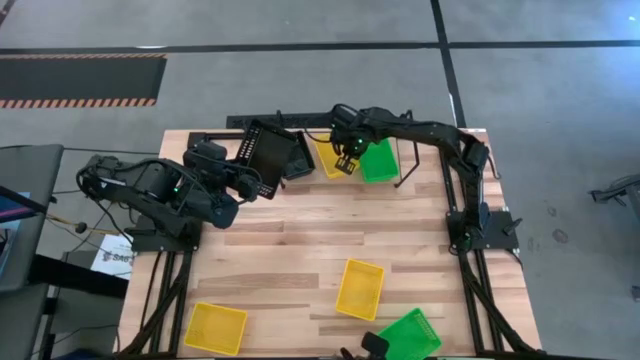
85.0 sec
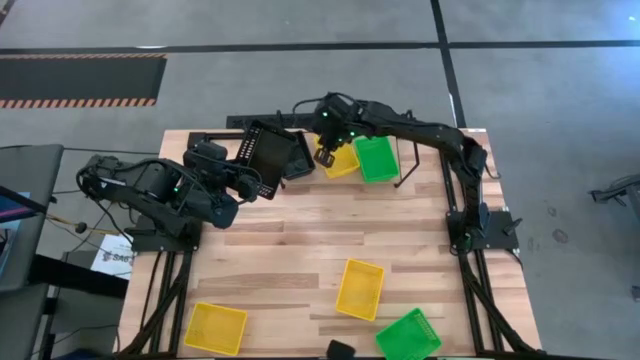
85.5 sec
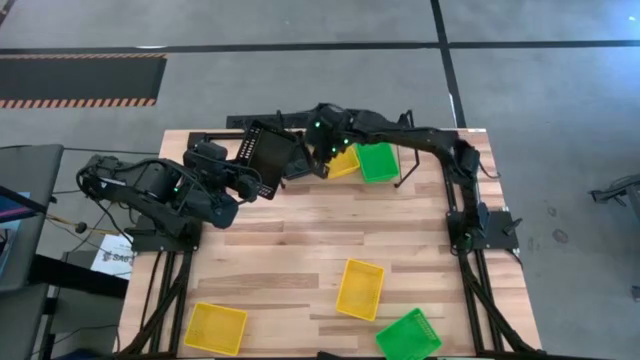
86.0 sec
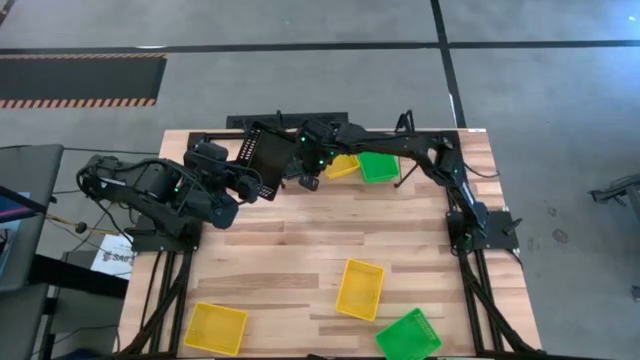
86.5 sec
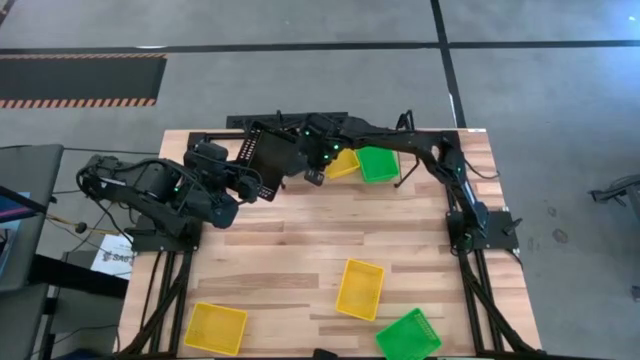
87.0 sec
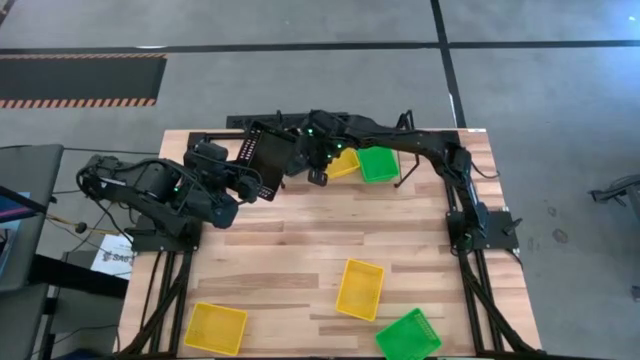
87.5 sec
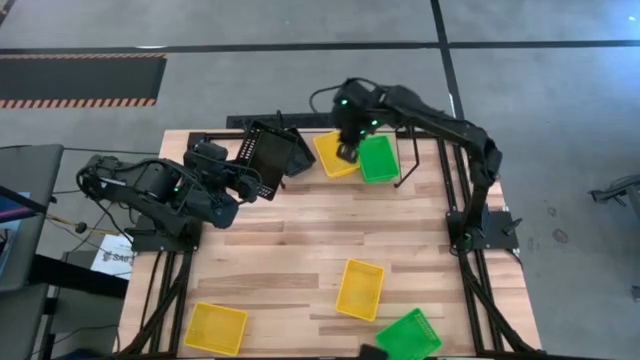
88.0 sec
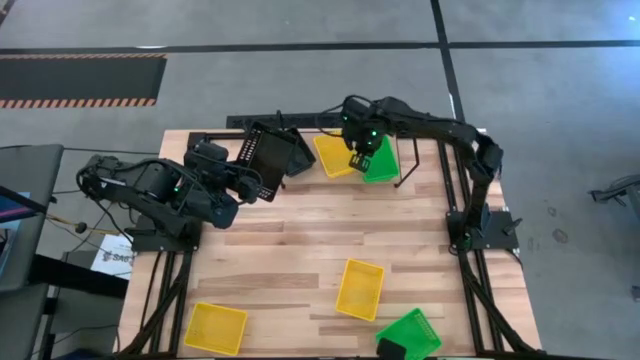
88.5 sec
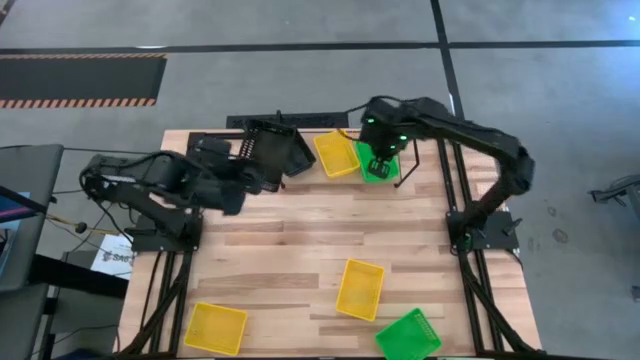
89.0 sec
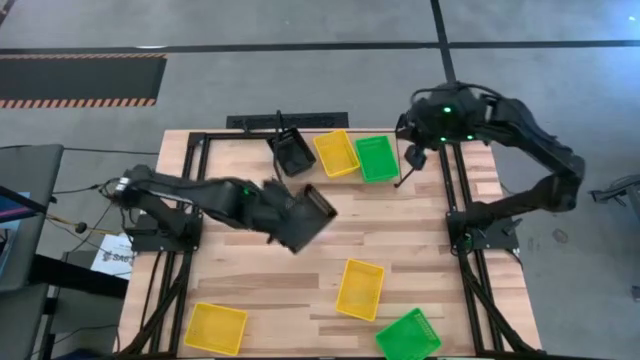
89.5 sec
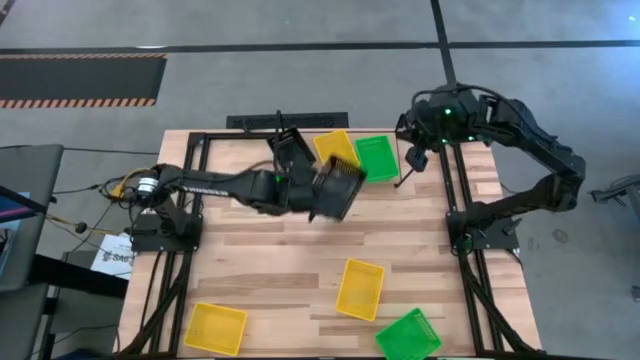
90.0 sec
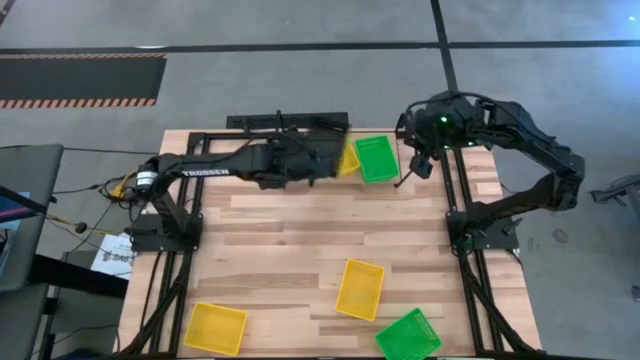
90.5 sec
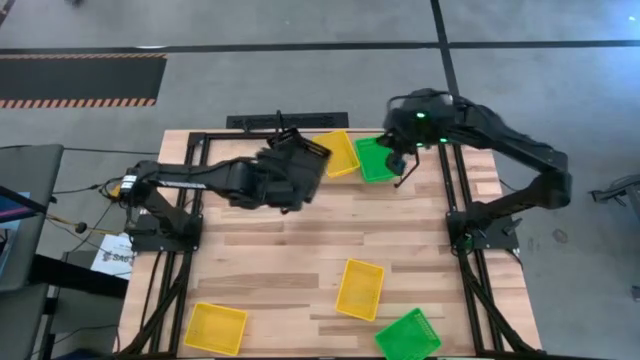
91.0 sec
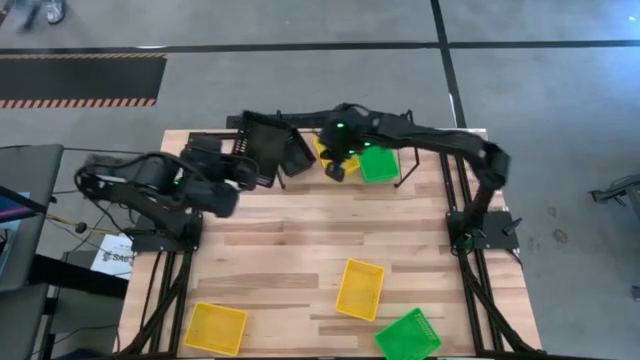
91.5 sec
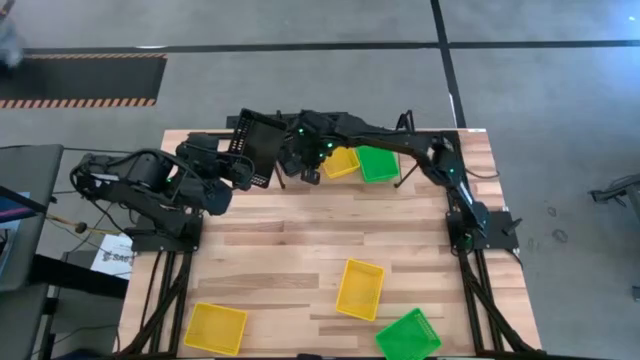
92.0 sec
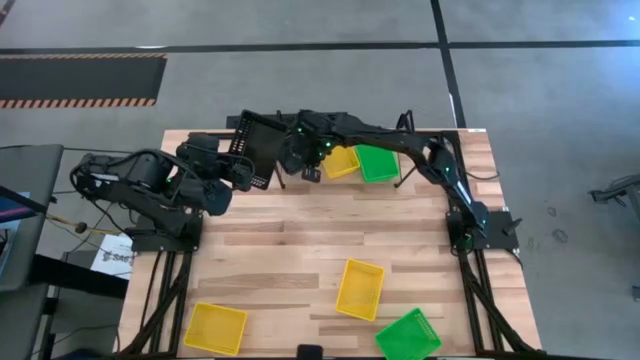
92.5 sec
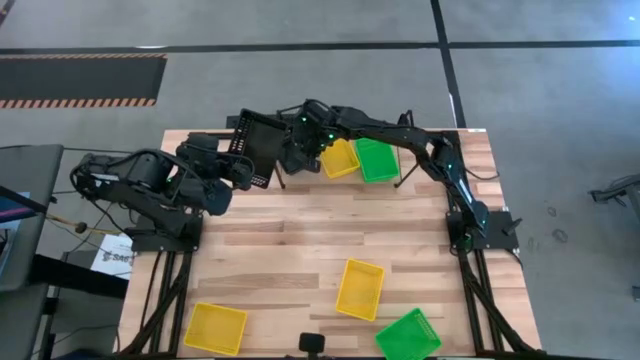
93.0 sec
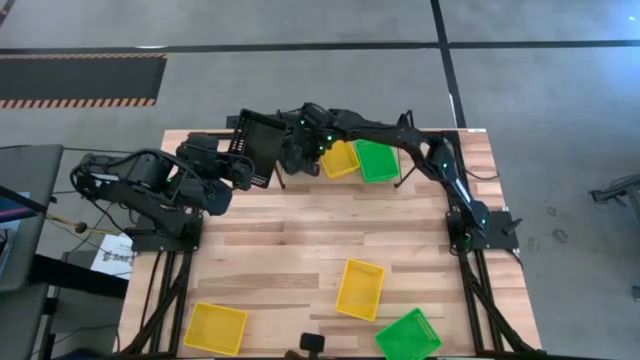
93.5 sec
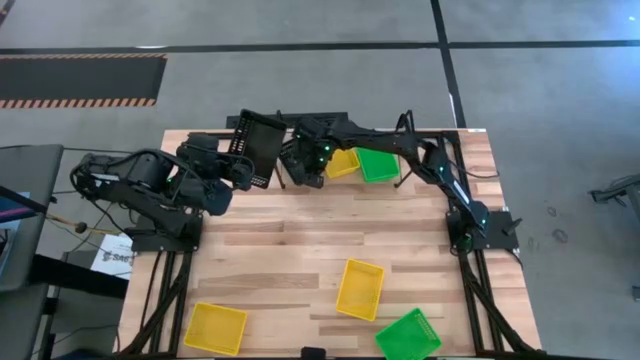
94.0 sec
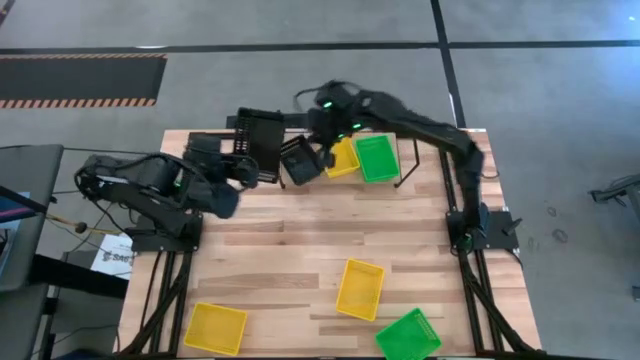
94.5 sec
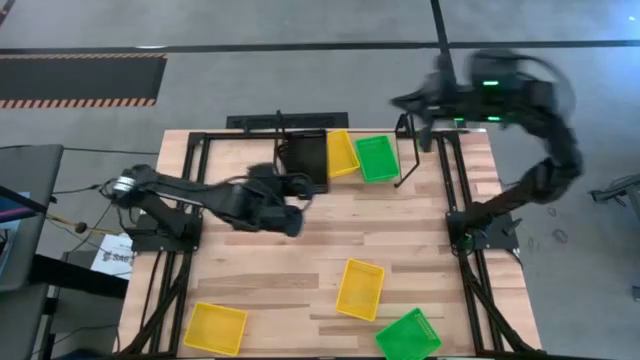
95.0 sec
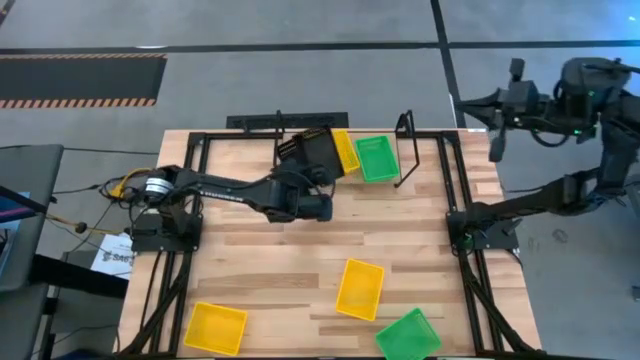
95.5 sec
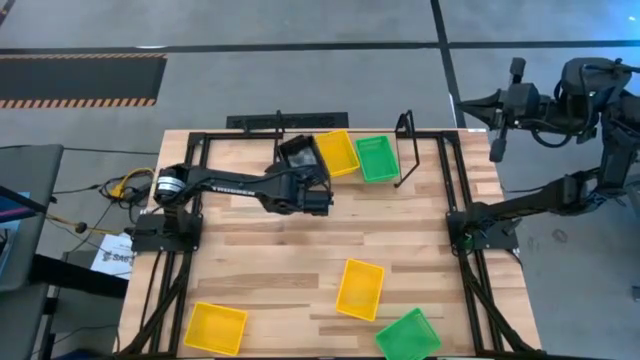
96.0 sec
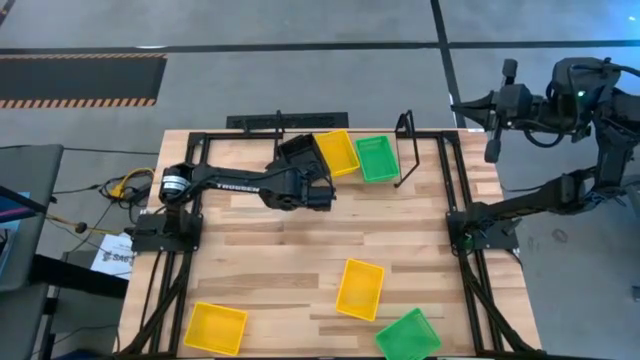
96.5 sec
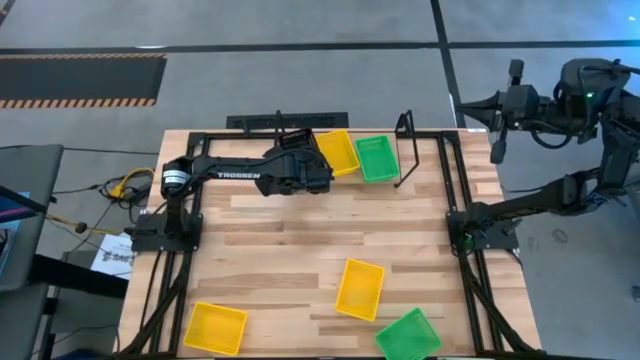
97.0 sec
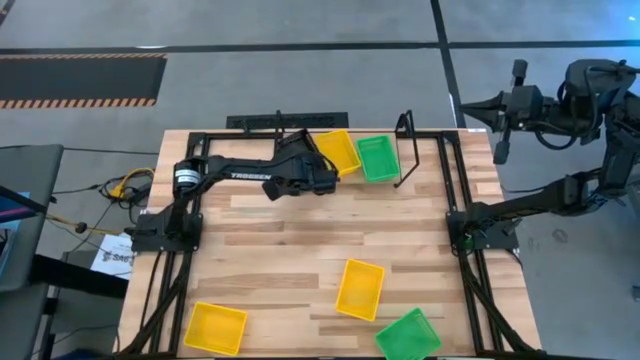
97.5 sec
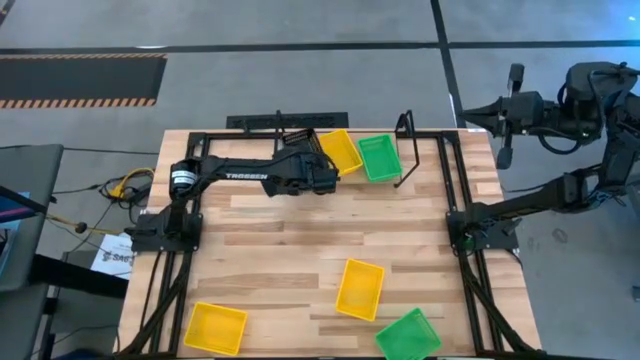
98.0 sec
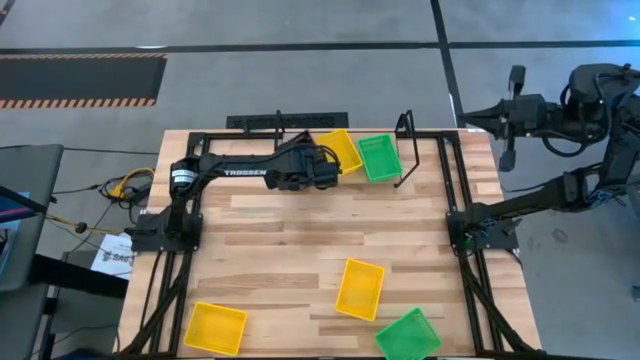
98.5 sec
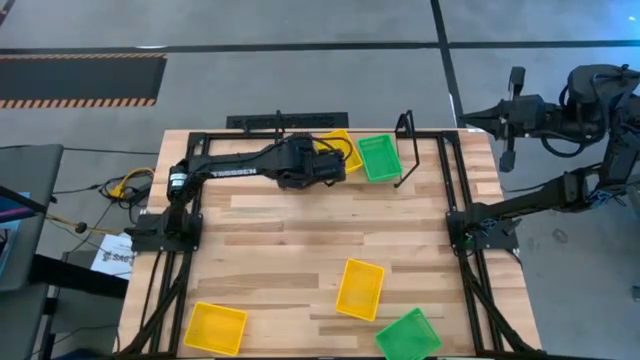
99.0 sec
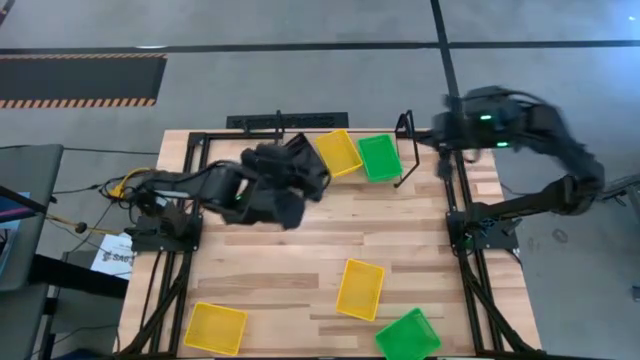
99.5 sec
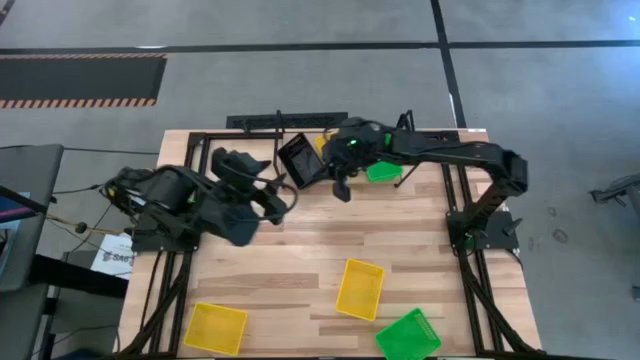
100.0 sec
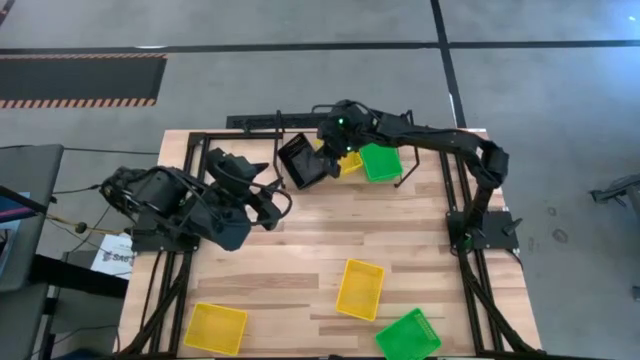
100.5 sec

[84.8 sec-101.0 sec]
Task: Stack baskets on shelf by color
Stack the black bin on top of the black bin on the shelf

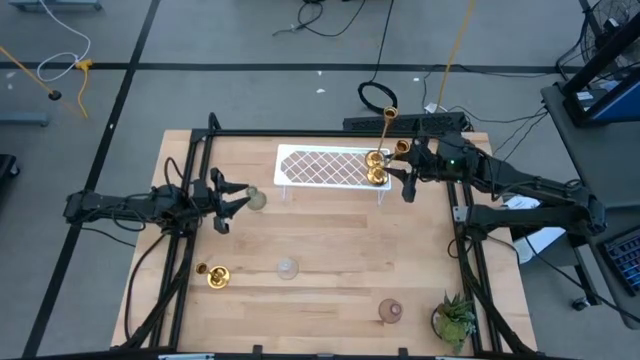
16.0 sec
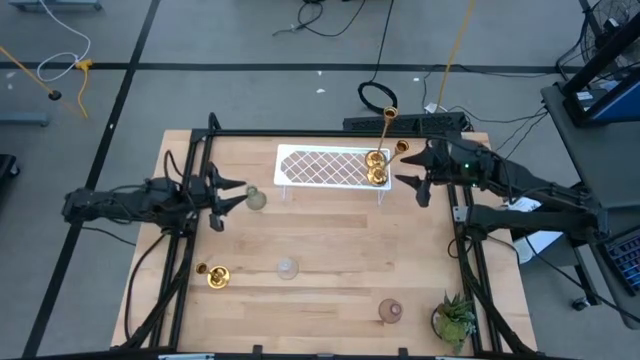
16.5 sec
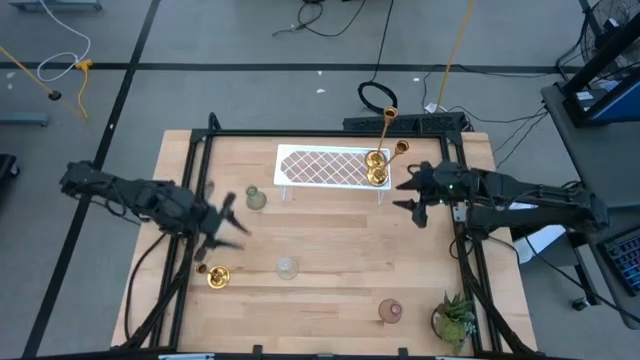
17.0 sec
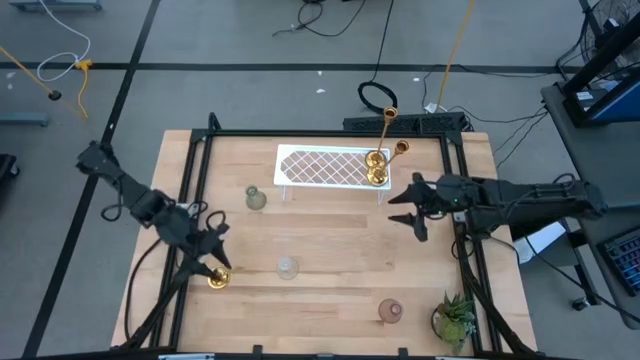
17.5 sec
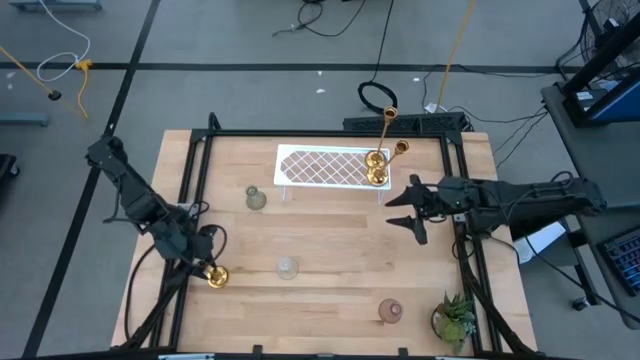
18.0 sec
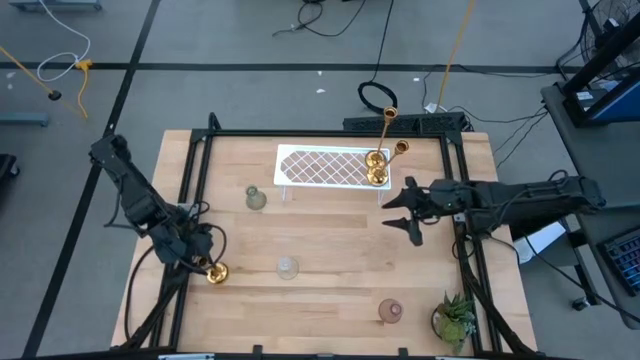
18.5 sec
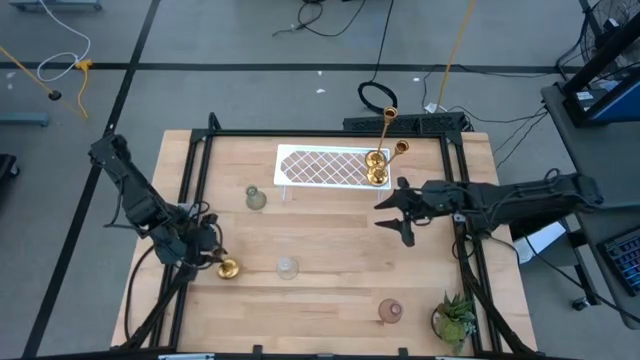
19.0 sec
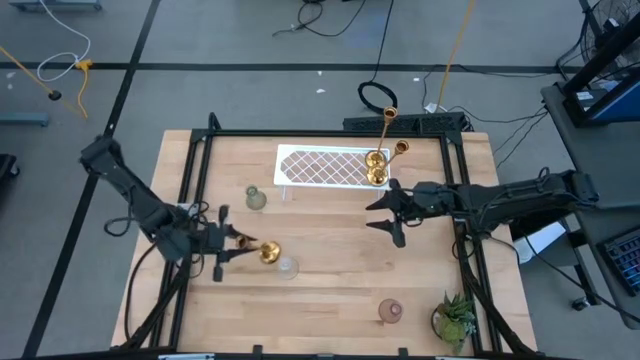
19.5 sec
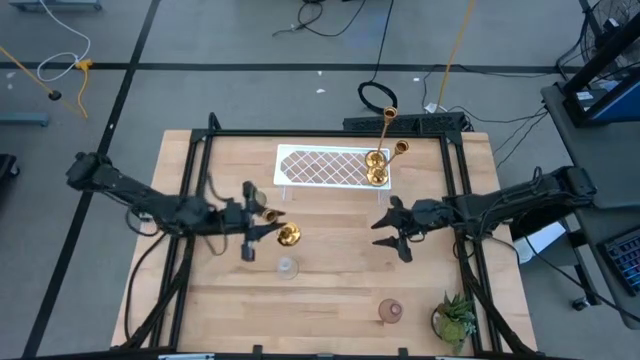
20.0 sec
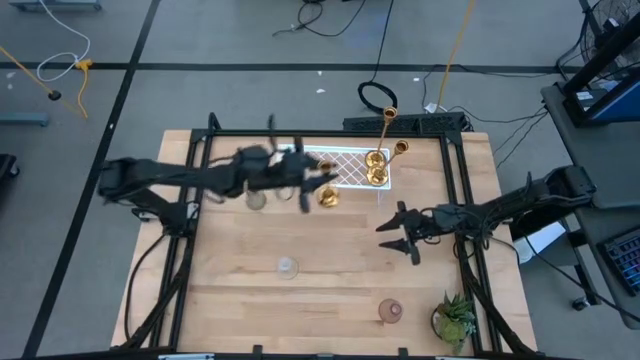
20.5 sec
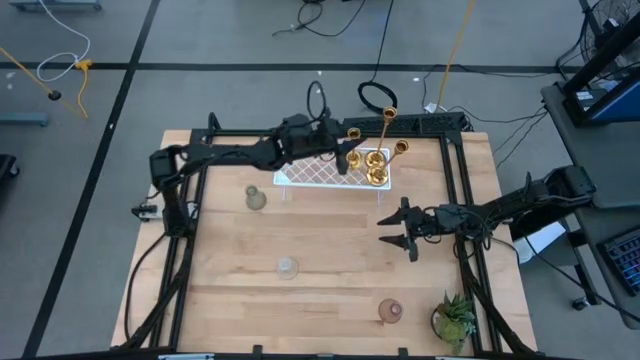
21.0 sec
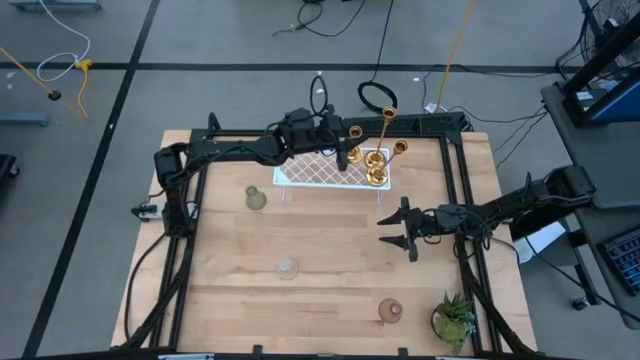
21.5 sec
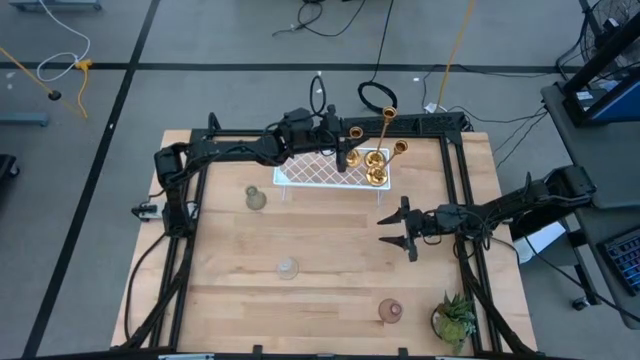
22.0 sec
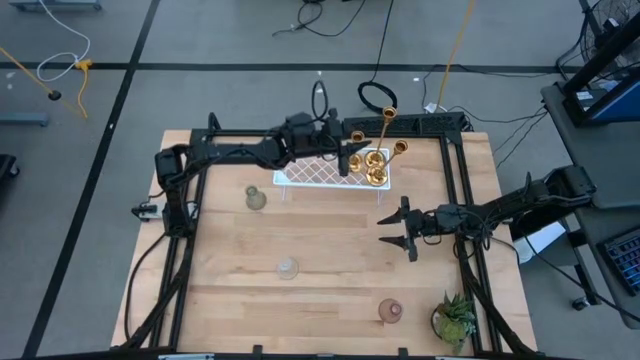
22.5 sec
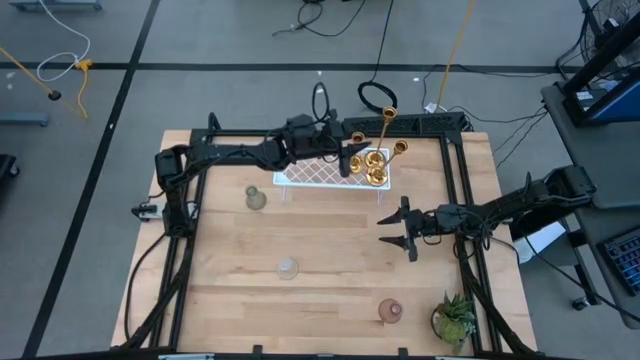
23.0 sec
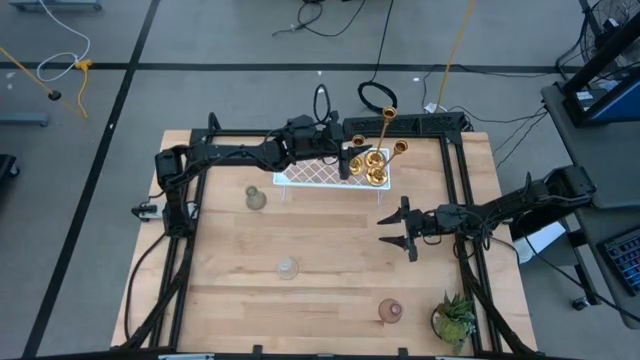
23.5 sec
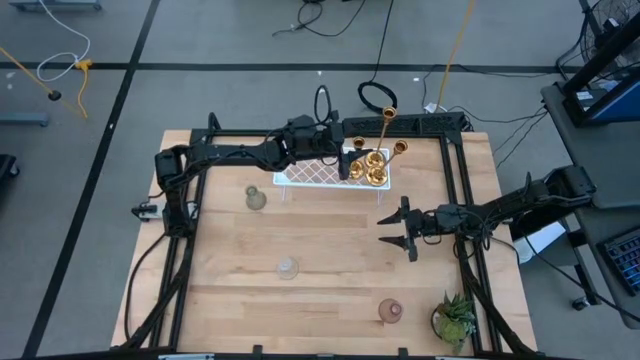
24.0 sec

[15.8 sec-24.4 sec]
Task: Pick & Place candle stick holders
Put the gold candle holder on the shelf
